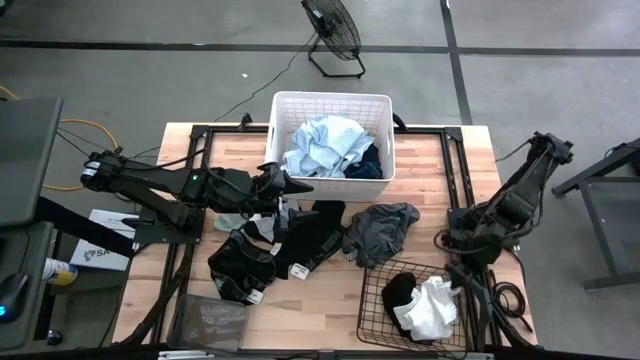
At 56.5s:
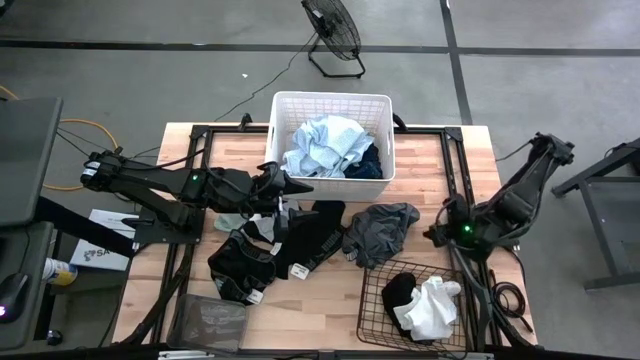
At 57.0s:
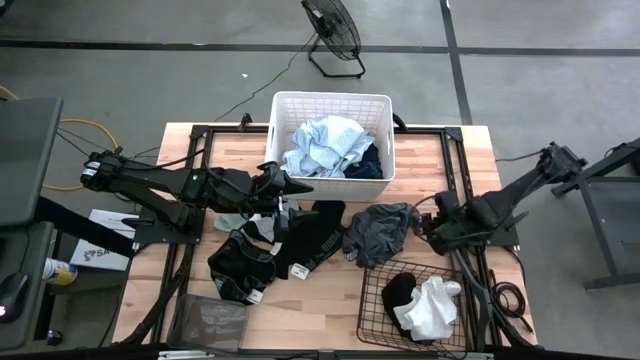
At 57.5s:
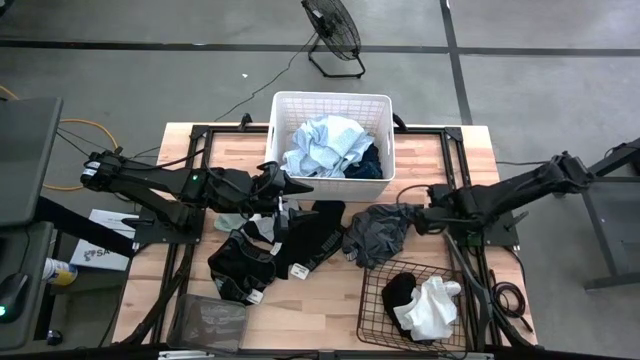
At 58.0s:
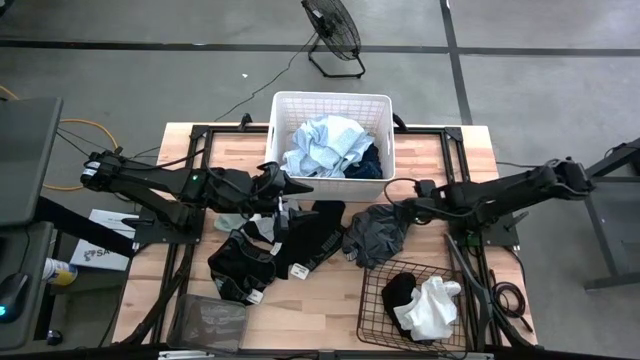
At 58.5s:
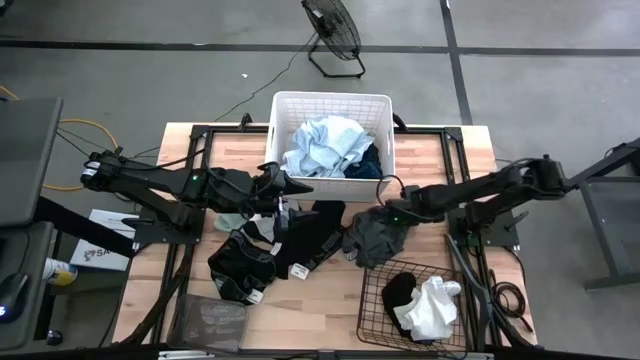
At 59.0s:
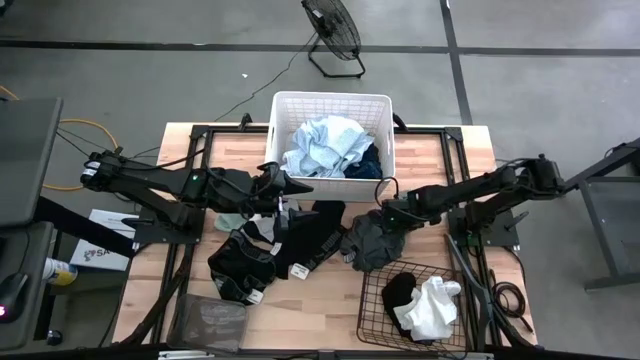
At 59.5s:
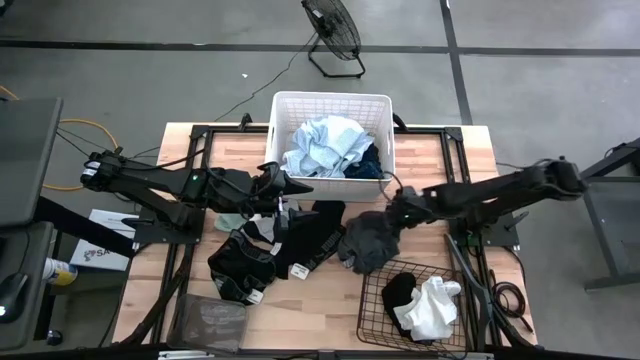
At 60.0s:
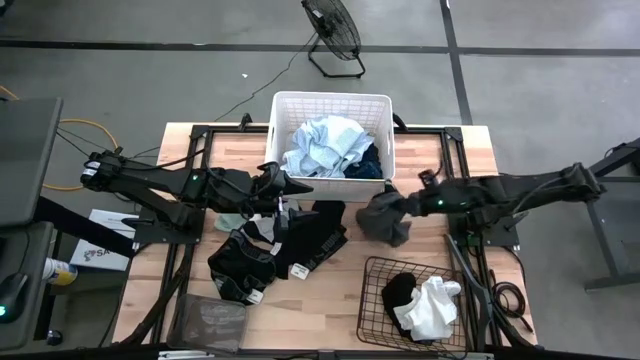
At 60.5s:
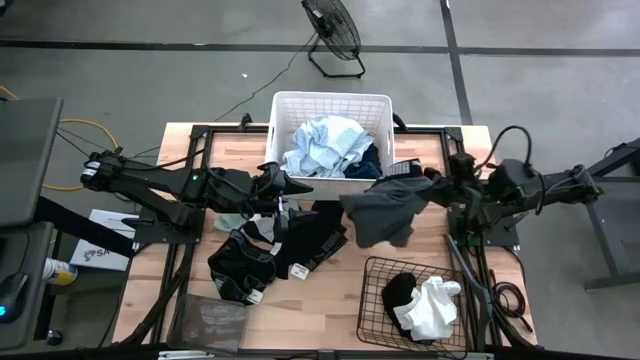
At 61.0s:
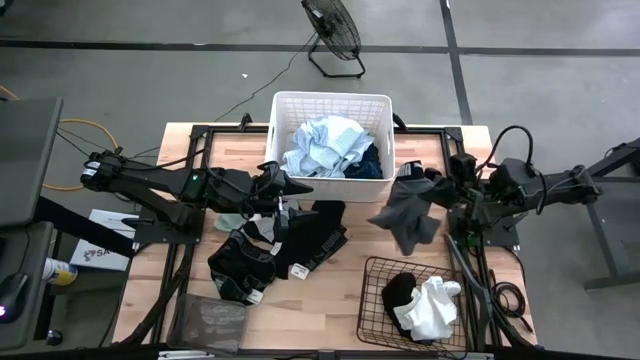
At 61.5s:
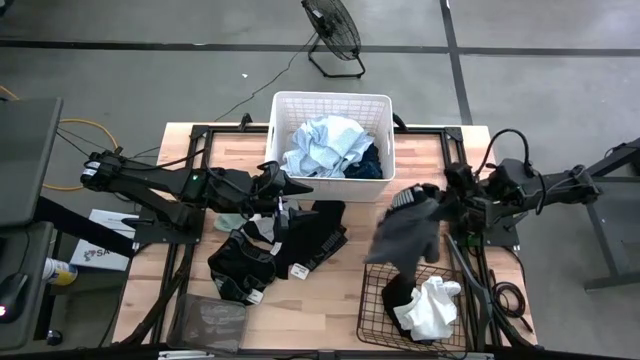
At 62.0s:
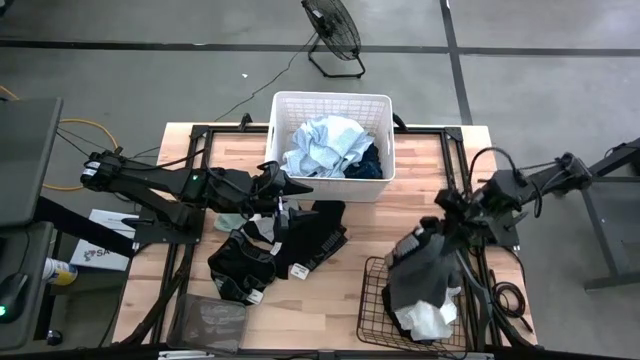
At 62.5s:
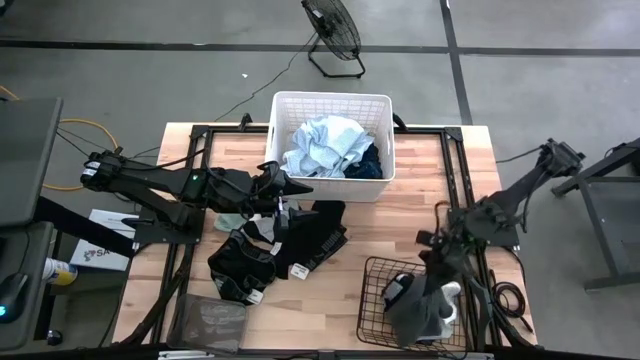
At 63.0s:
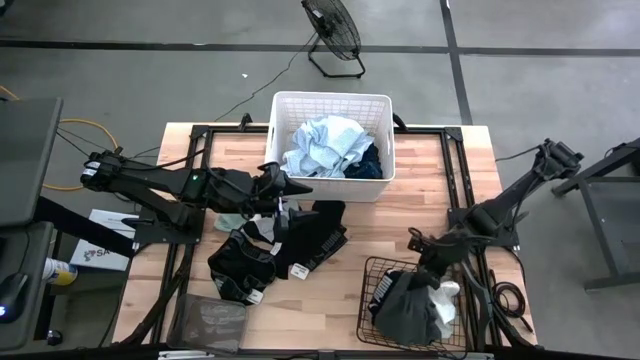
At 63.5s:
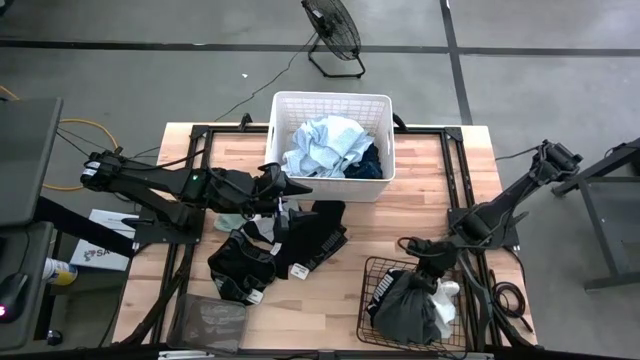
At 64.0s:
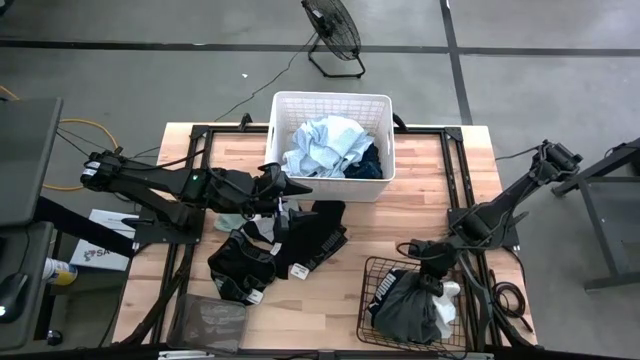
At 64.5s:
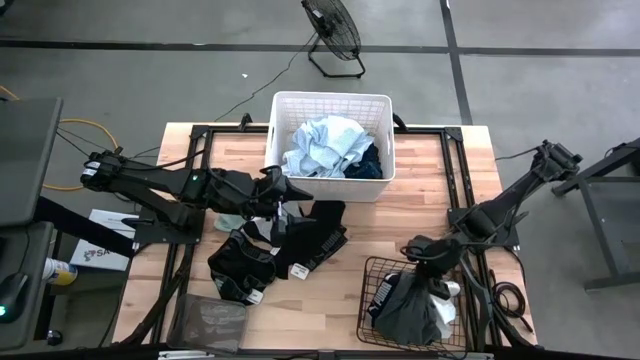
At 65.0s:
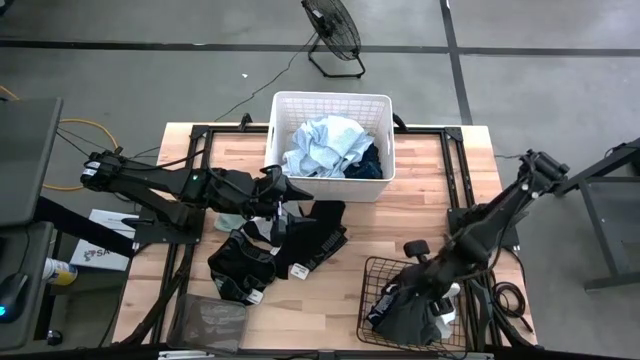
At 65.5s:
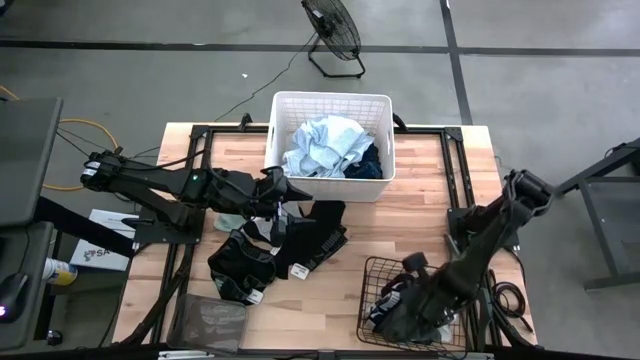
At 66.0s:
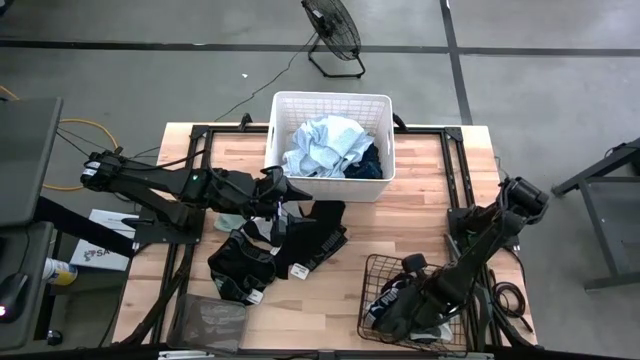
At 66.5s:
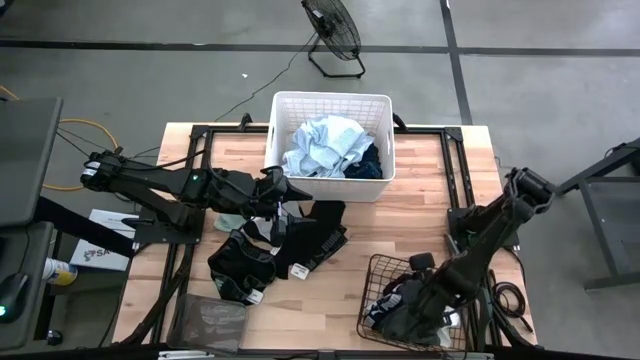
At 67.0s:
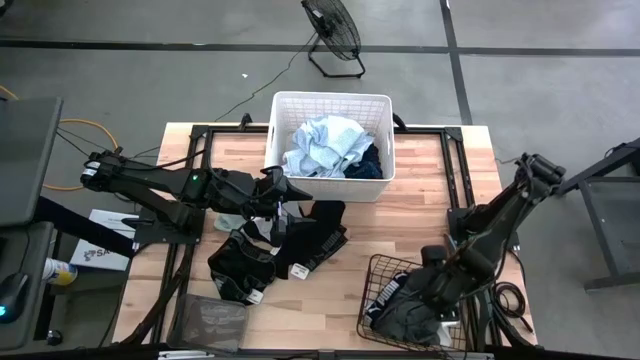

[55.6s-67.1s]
Task: Pick & Place Cloths
Put the gray boxer into the wire basket

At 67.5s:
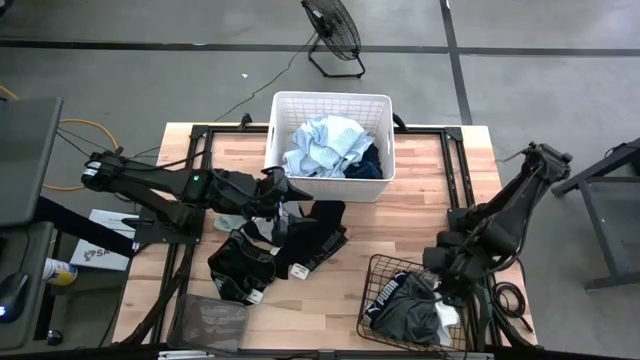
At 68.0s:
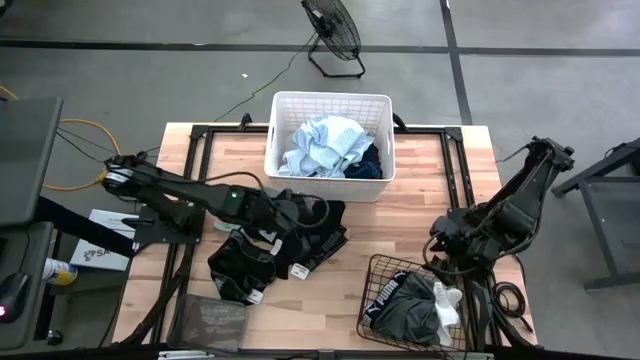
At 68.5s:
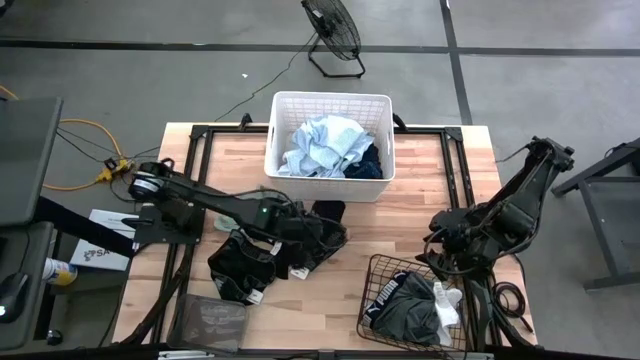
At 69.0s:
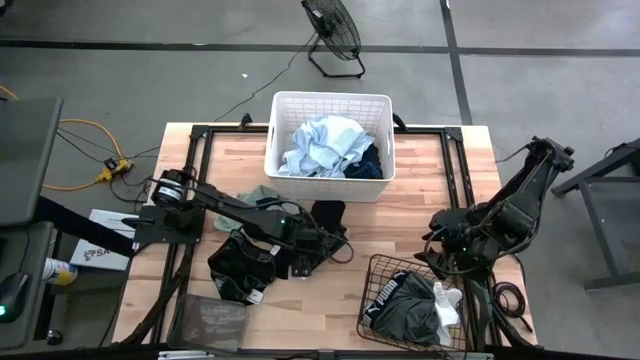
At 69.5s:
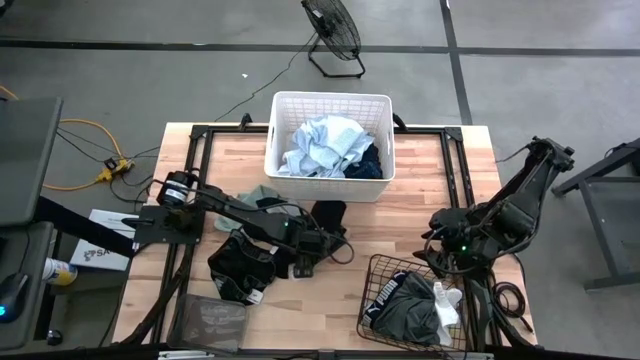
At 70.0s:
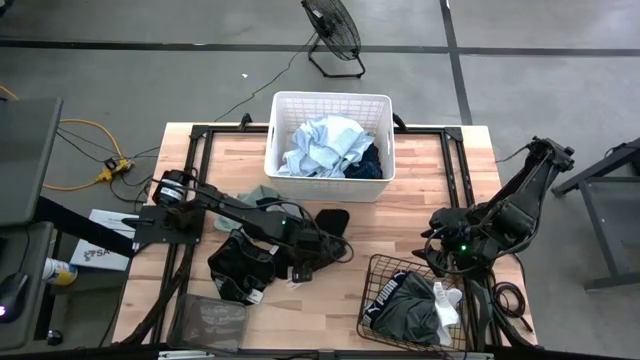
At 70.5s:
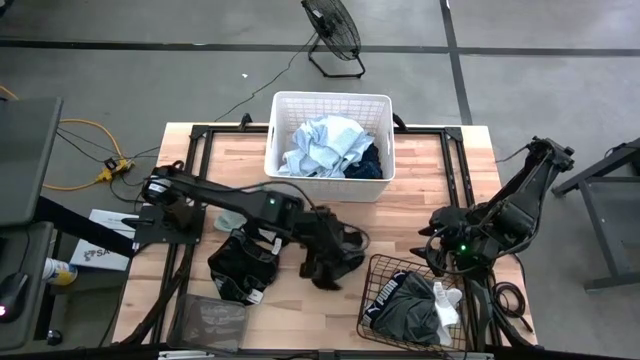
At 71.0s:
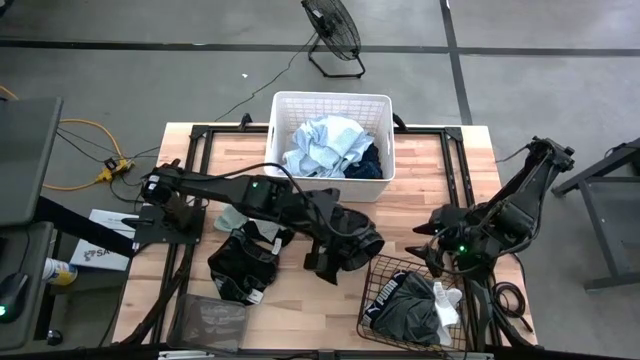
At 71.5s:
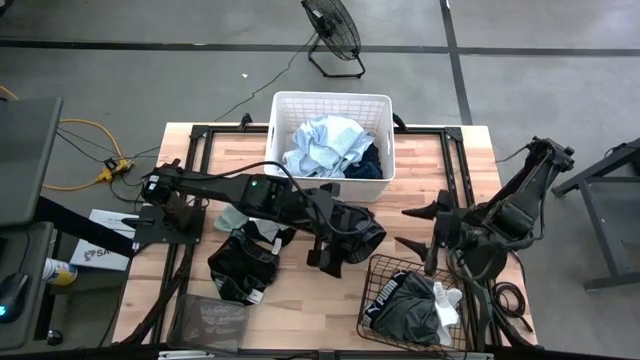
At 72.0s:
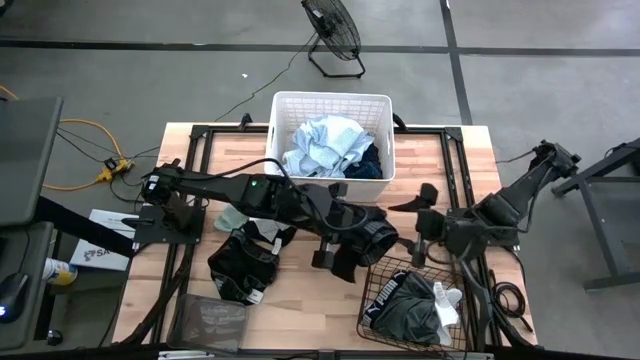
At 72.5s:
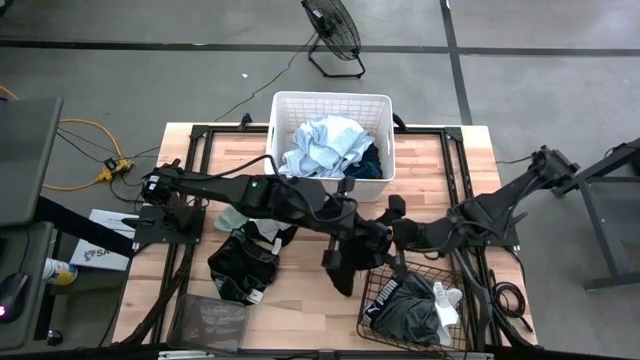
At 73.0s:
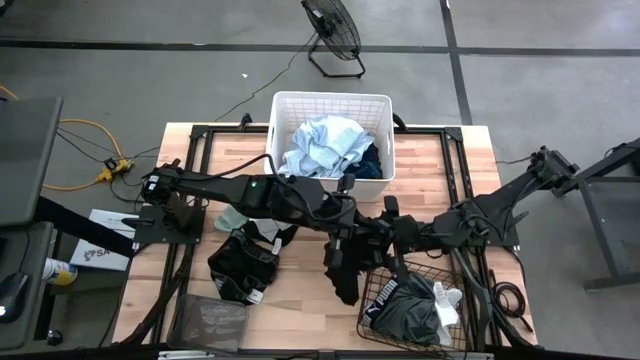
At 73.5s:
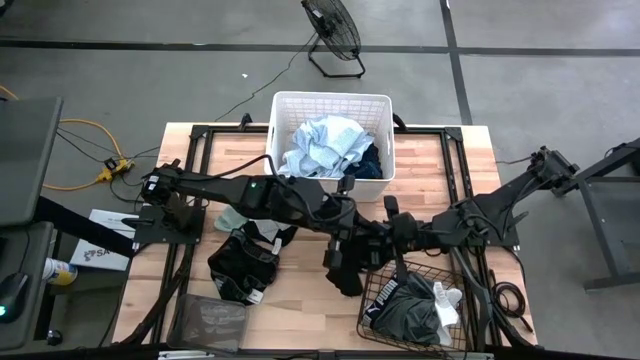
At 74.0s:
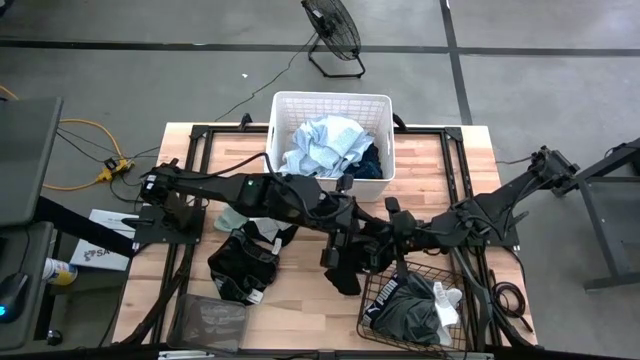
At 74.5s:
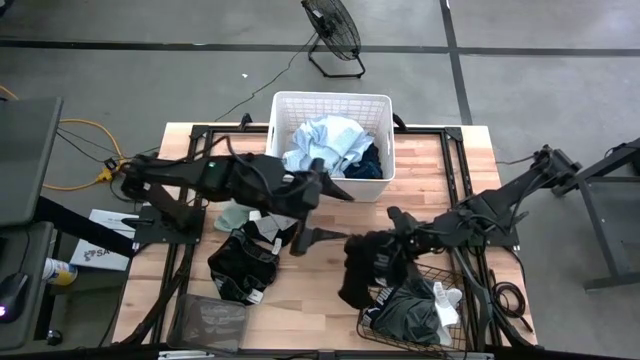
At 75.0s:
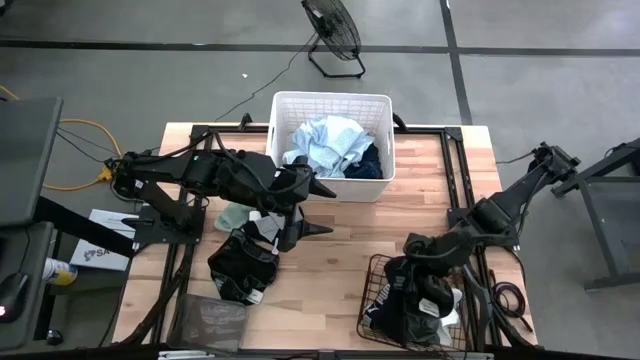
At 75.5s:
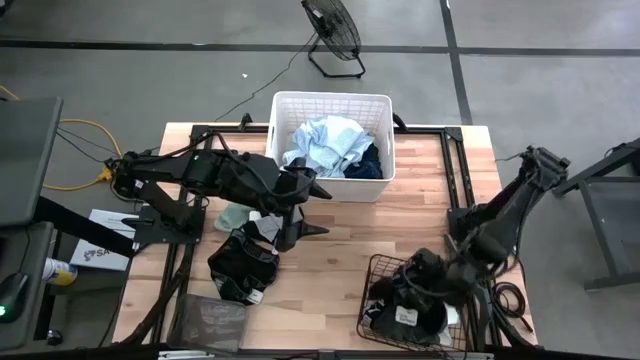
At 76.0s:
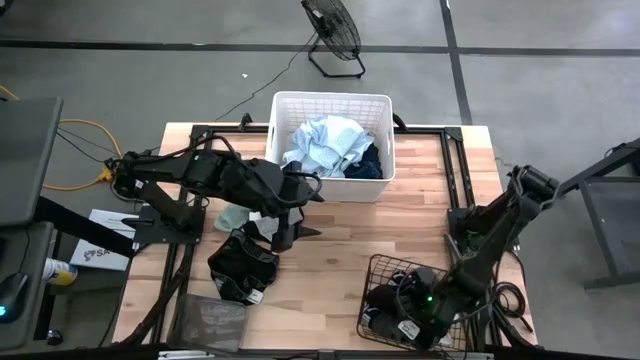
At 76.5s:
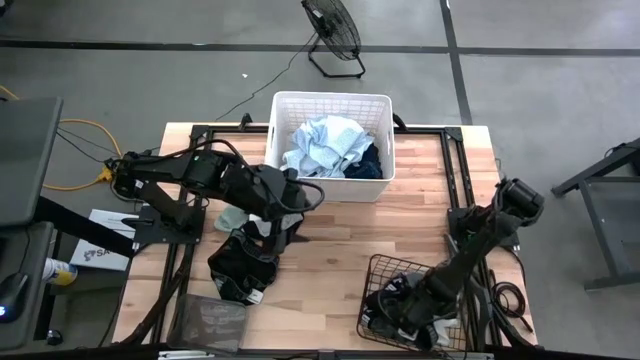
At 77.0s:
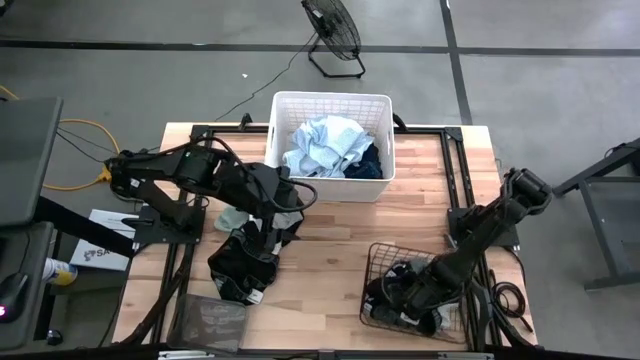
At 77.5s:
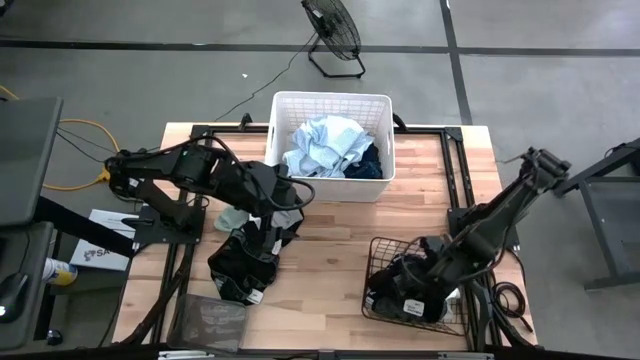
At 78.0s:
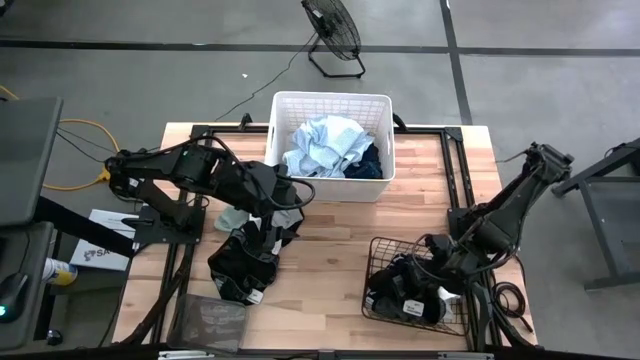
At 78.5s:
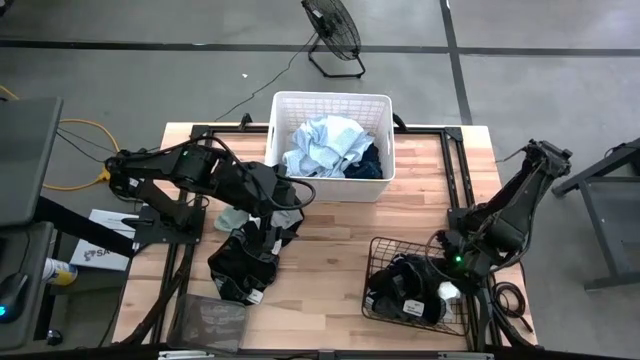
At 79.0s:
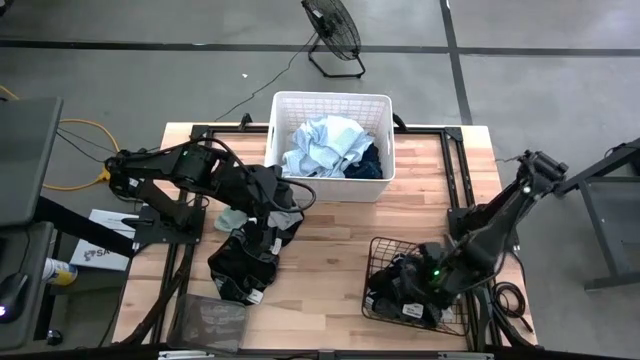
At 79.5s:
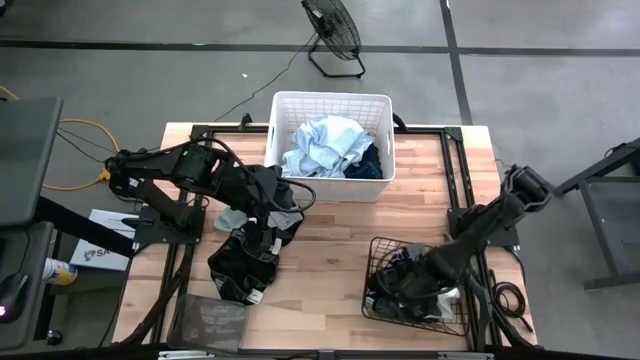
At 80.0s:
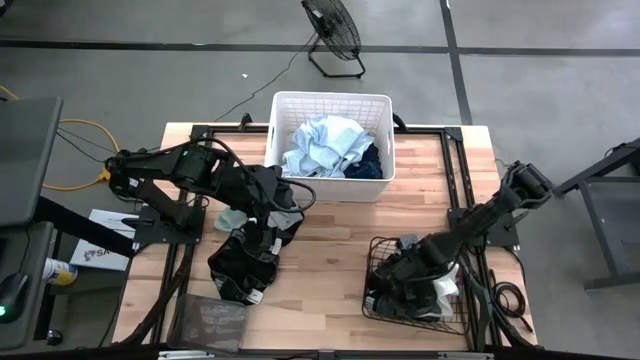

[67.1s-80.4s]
Put the right black boxer into the wire basket
